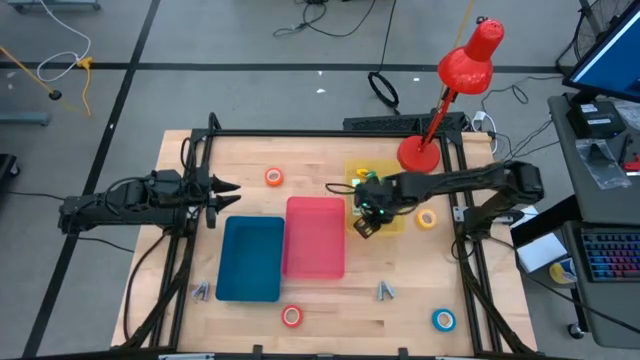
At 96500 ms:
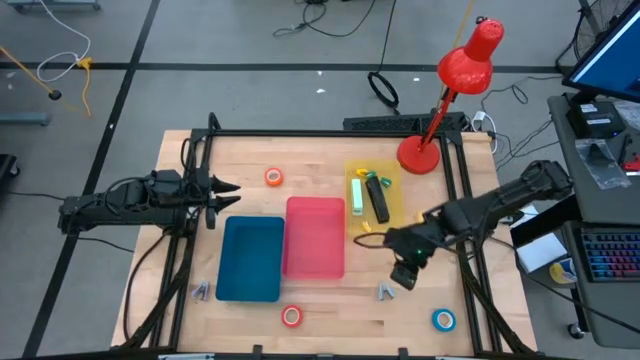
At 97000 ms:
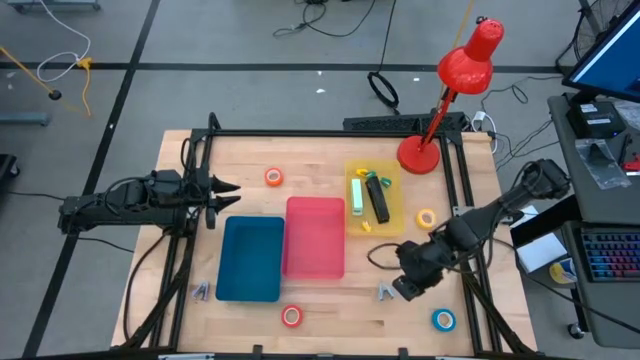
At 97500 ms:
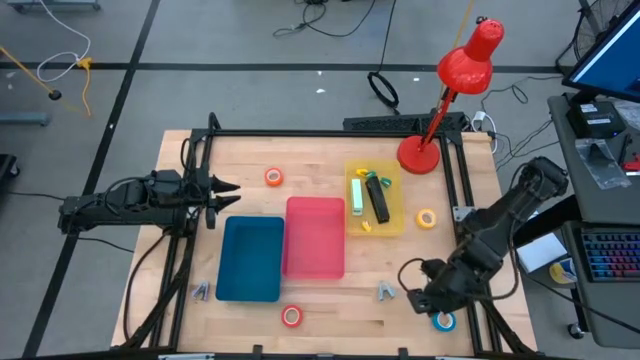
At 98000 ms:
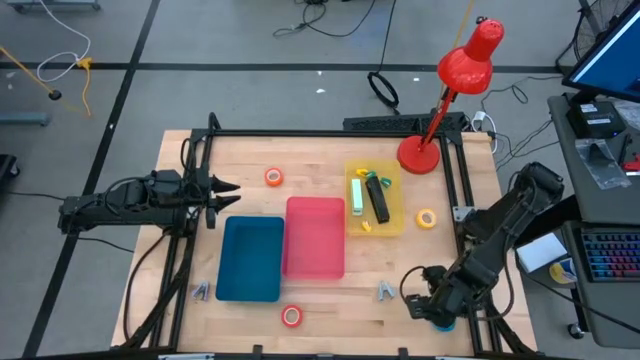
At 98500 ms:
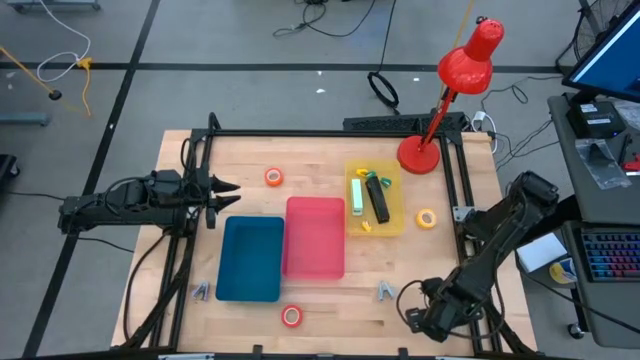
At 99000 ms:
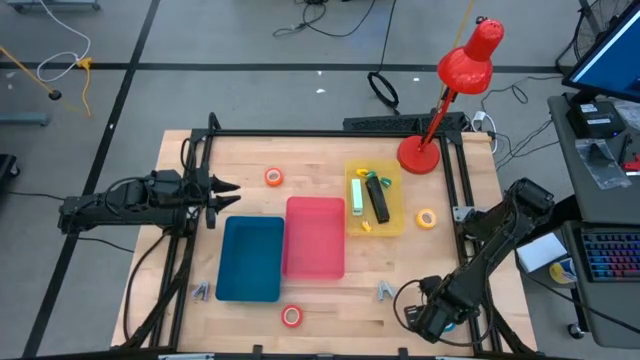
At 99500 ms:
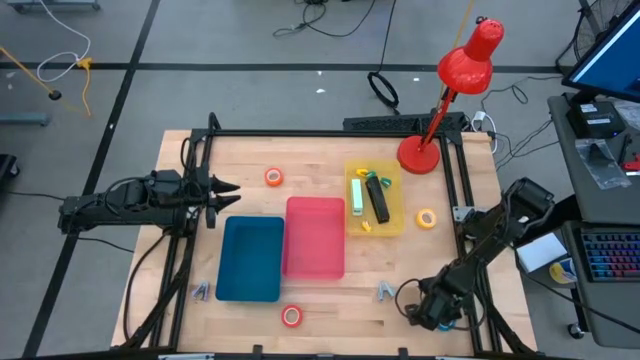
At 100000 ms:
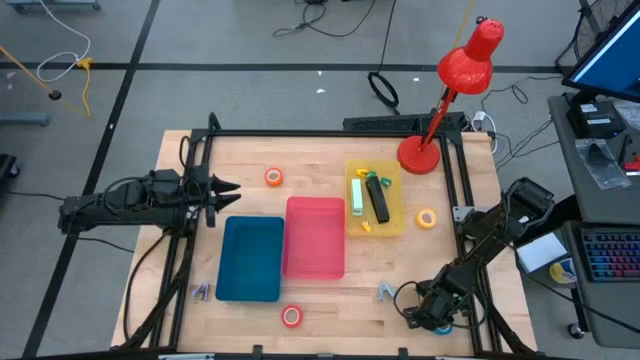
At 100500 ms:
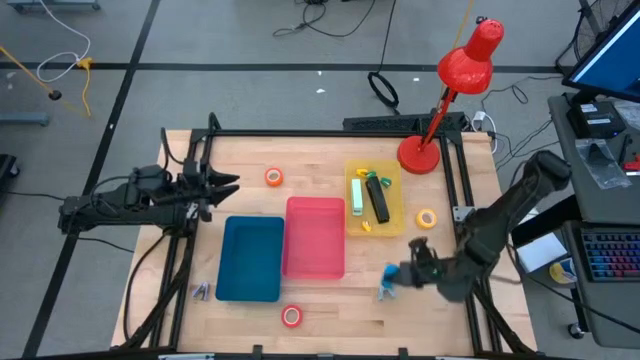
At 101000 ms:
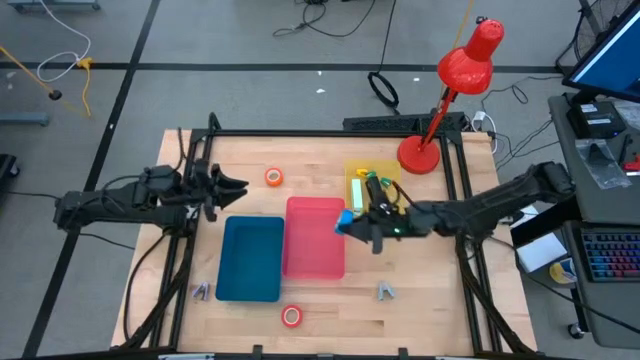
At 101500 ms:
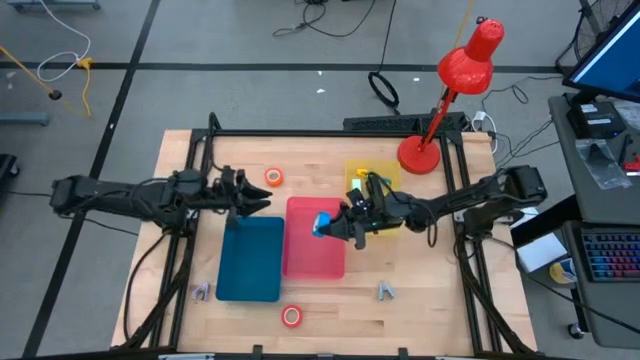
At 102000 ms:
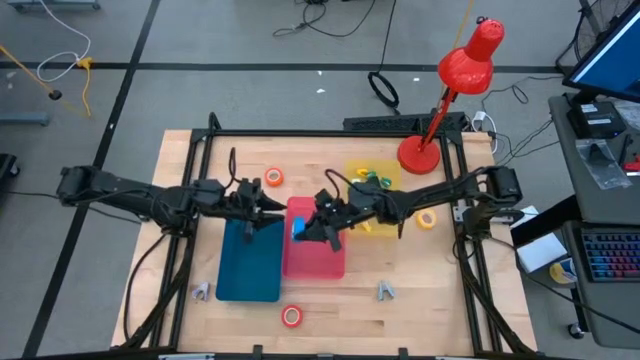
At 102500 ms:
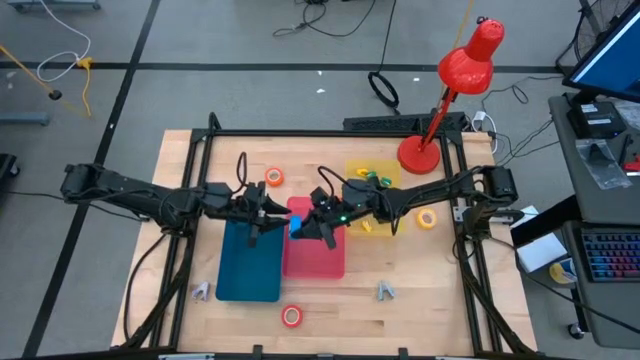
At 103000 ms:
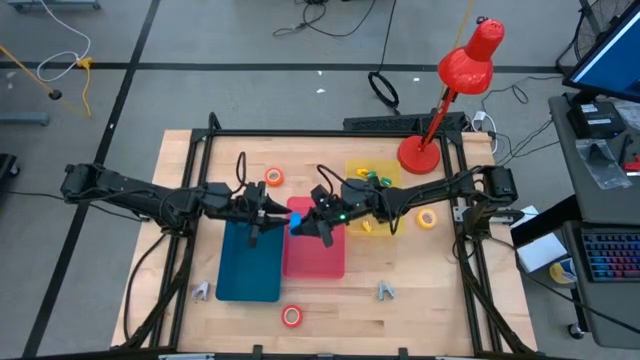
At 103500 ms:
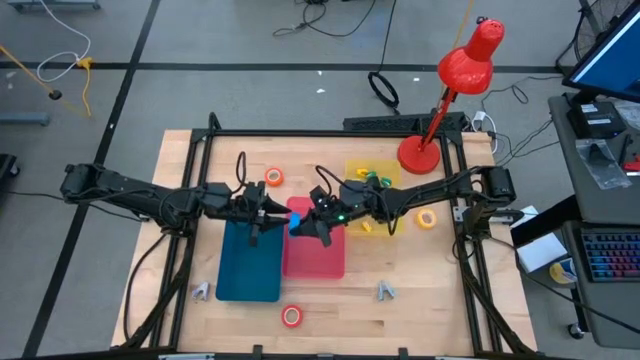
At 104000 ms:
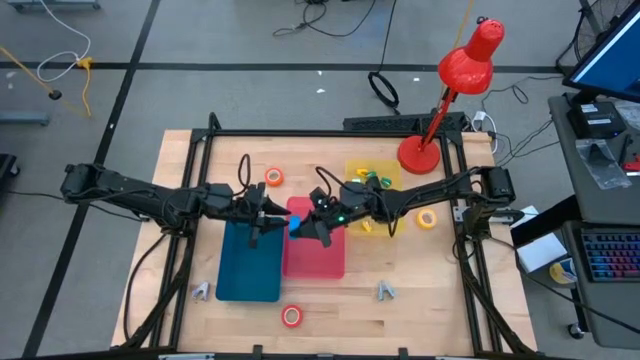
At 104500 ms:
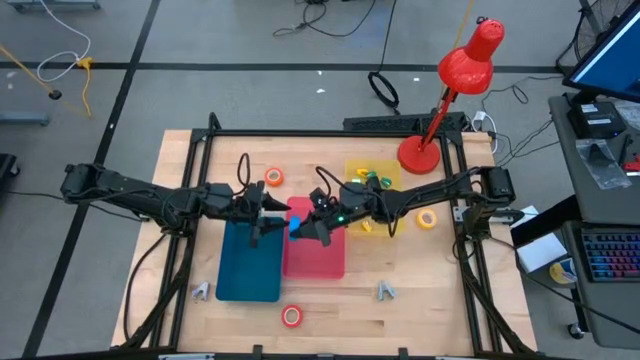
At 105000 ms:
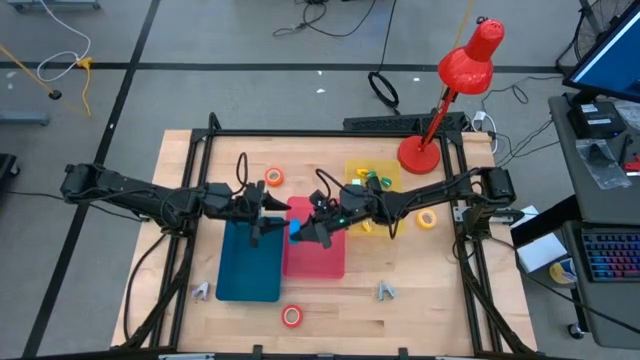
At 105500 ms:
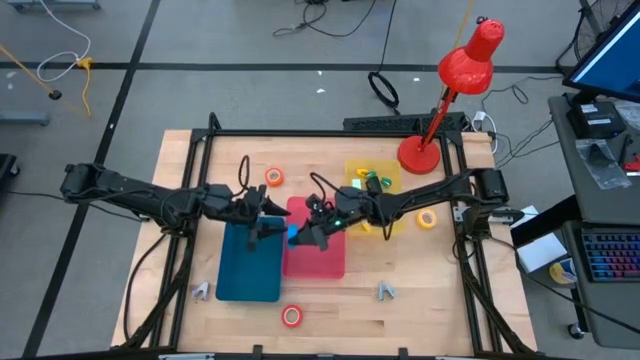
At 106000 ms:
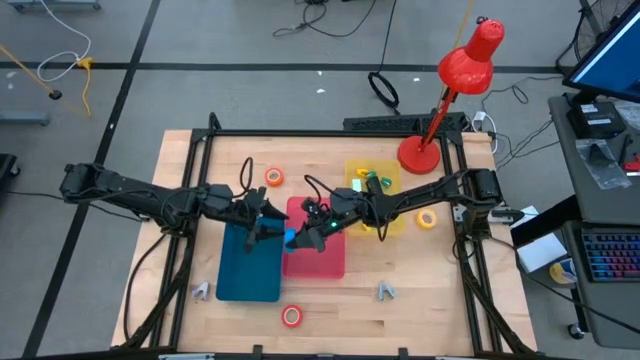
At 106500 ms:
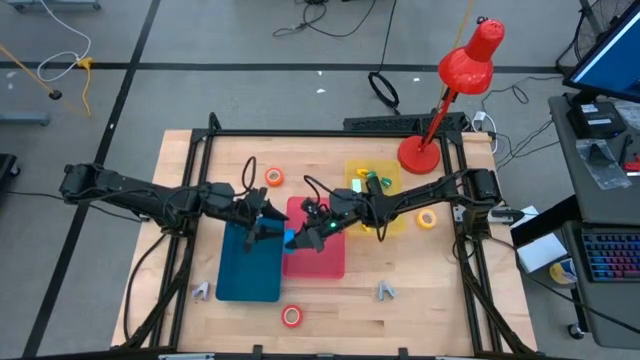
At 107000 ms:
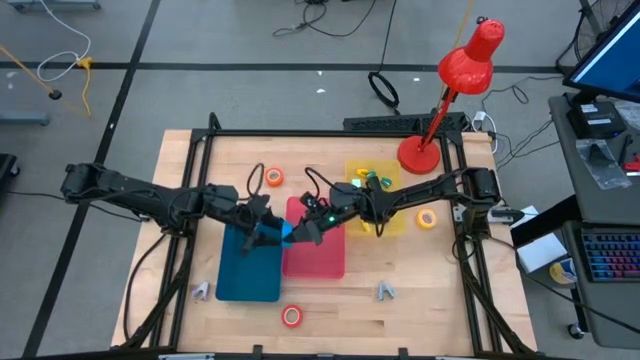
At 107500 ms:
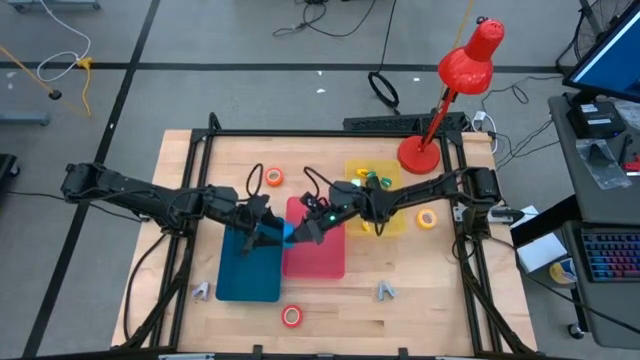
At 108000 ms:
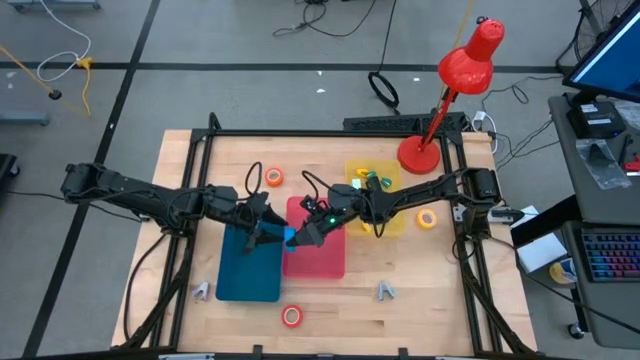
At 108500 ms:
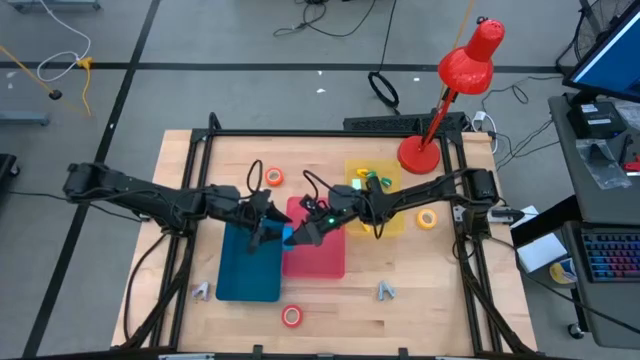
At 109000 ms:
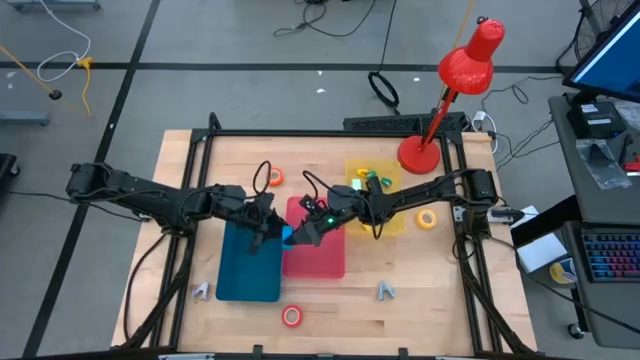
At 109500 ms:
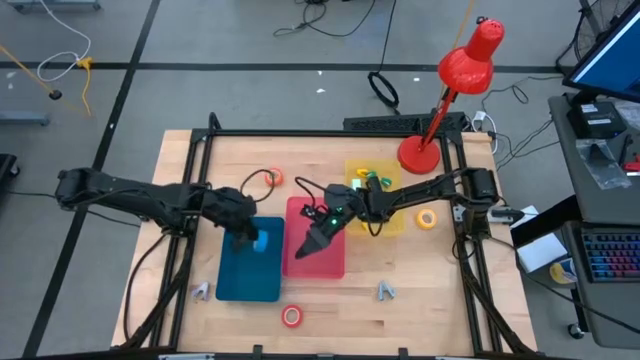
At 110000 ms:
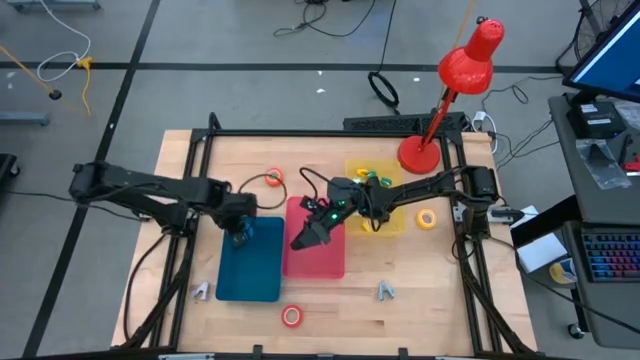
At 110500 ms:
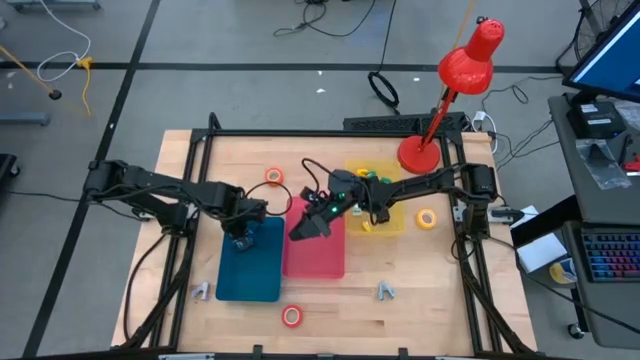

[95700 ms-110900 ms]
Task: Pick and place Stapler, Stapler remover, tape
Put the blue tape into the blue bin

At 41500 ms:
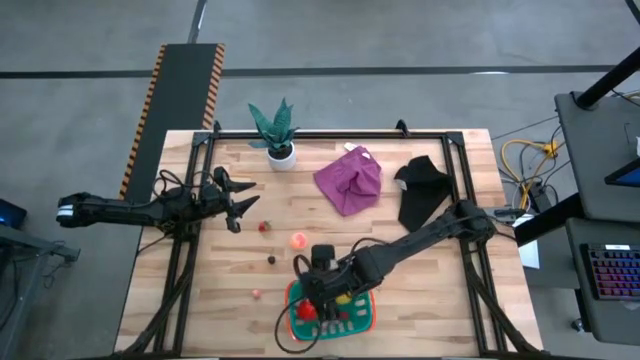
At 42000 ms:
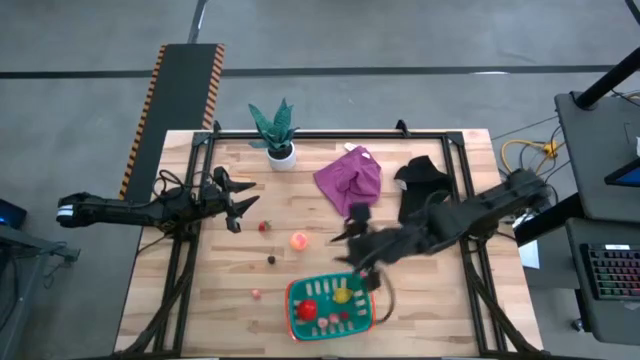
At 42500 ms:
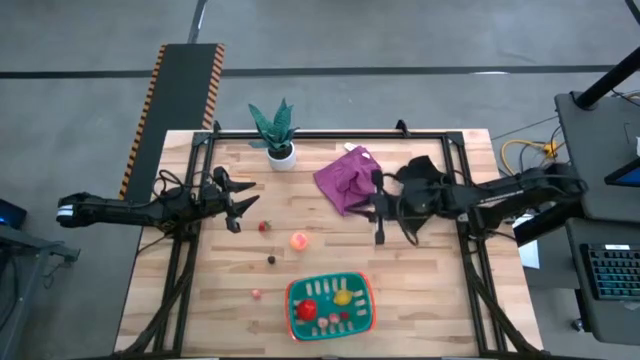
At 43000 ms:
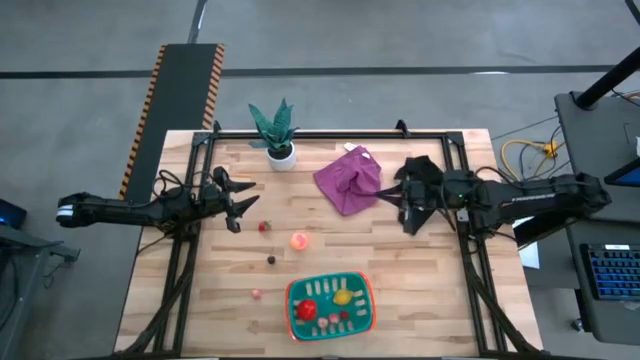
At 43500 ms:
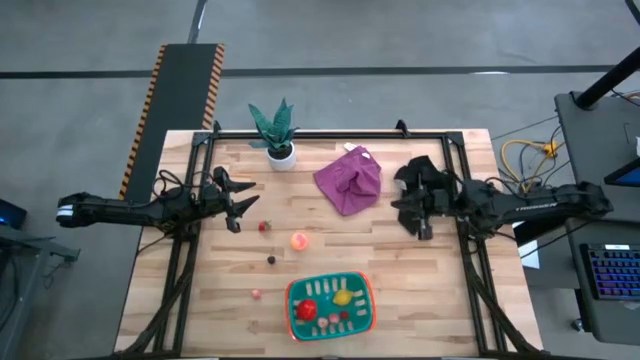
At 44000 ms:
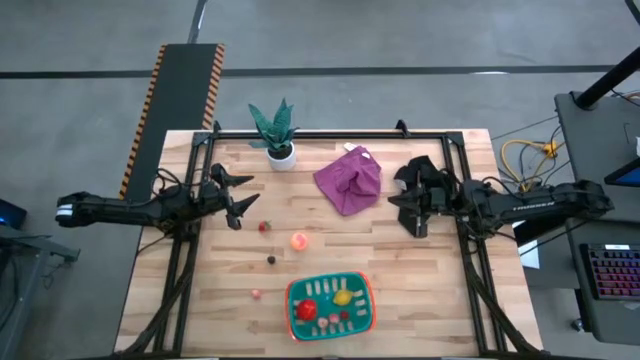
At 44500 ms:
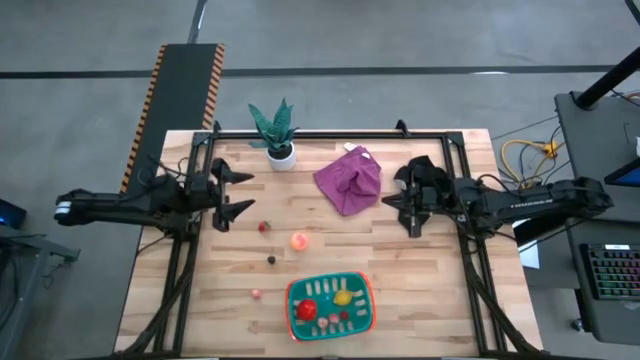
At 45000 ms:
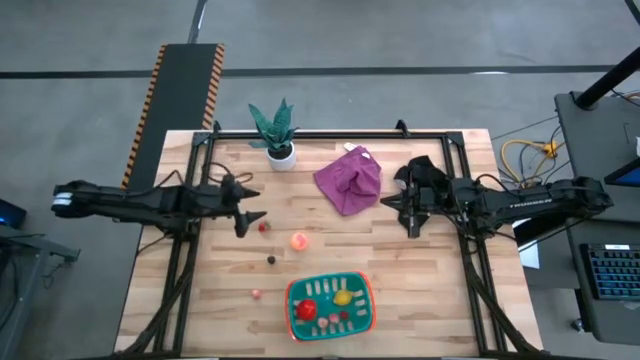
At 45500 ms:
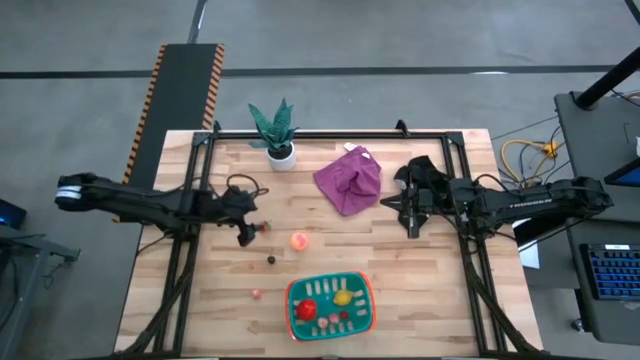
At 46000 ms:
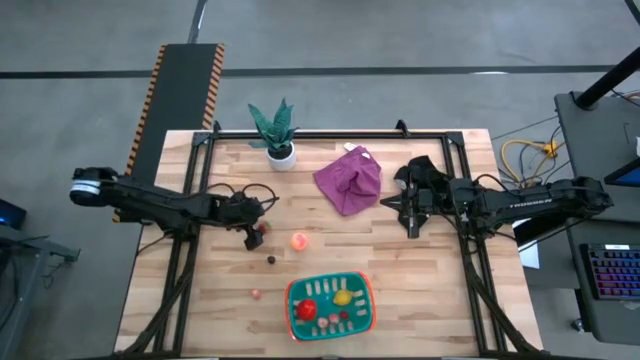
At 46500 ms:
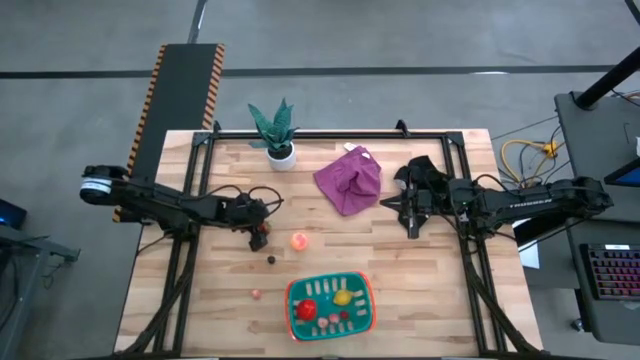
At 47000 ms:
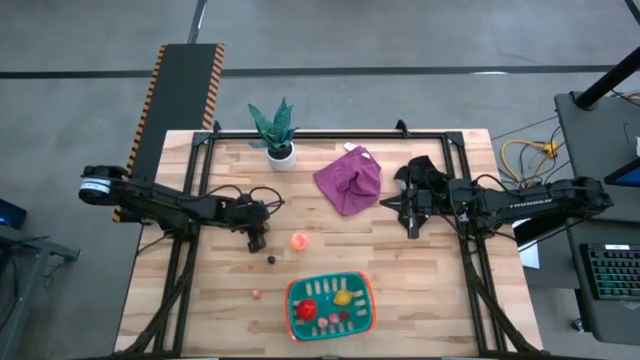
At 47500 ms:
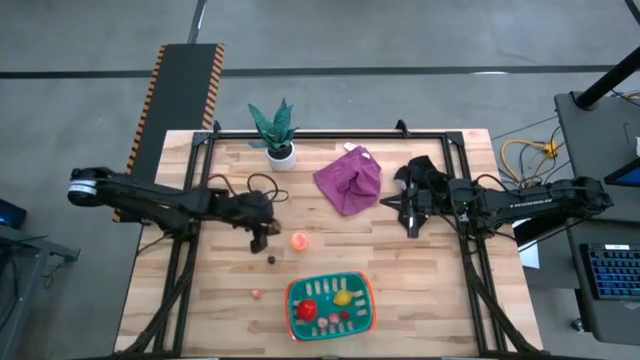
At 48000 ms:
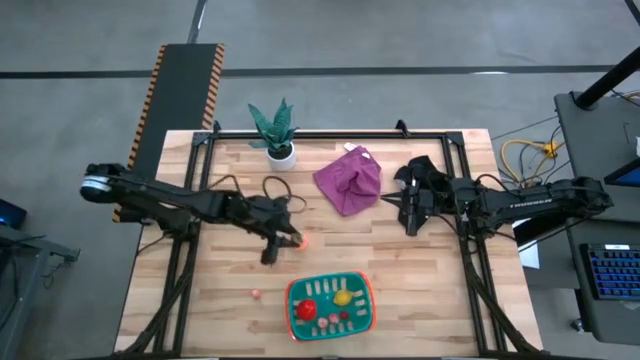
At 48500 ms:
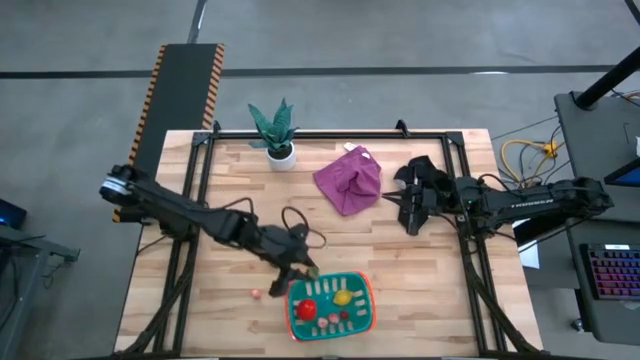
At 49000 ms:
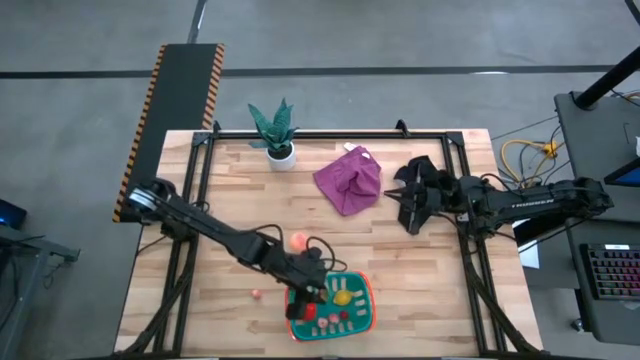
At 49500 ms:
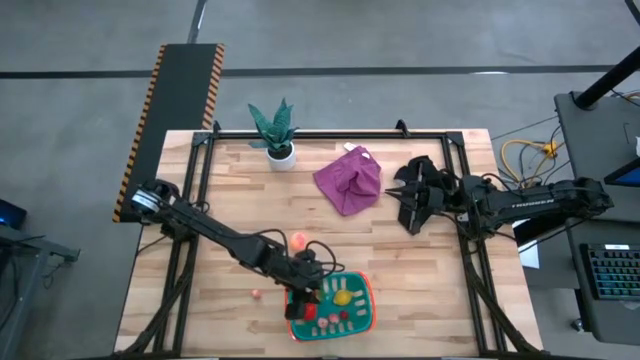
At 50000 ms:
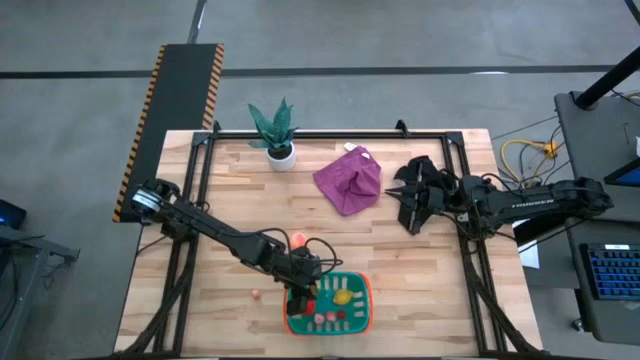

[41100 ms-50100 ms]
Task: Pick and placing Produce into tupperware
Put the red strawberry into the green basket
